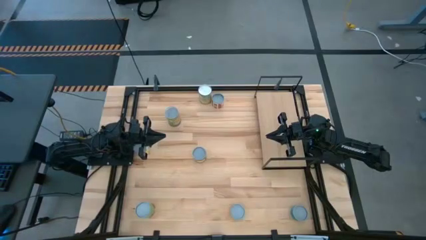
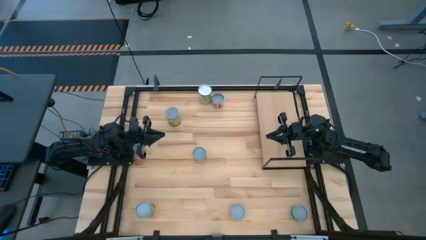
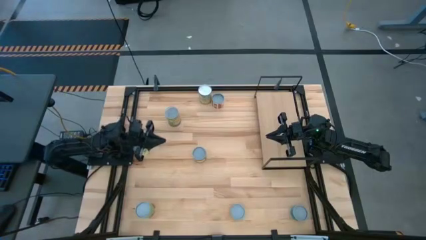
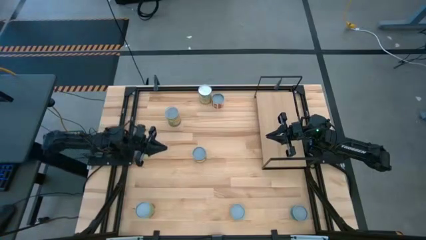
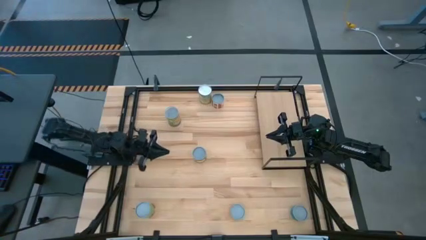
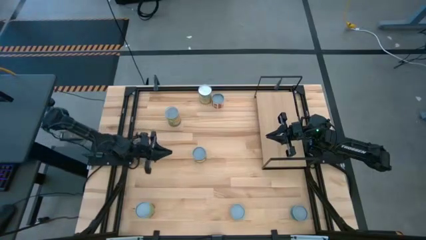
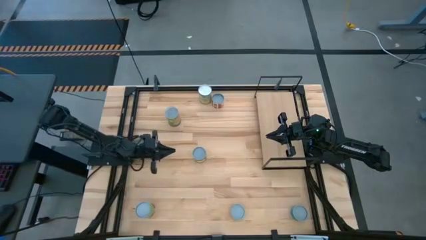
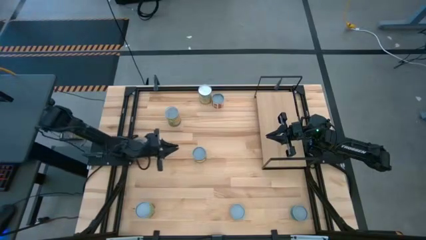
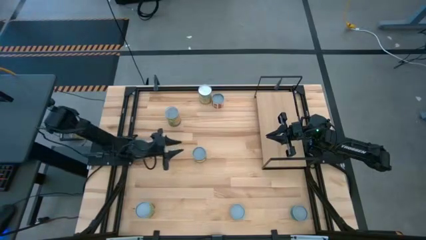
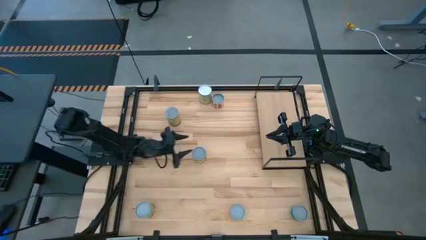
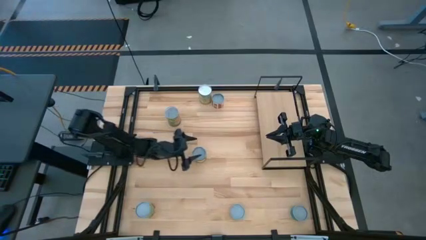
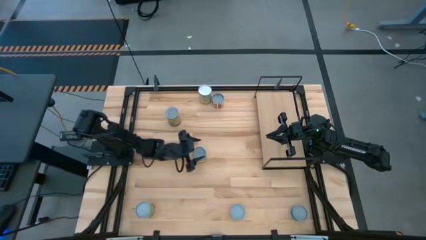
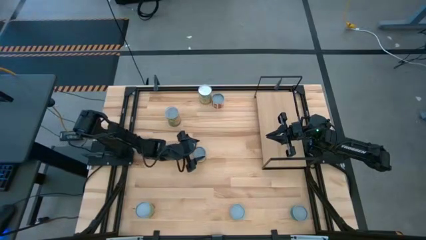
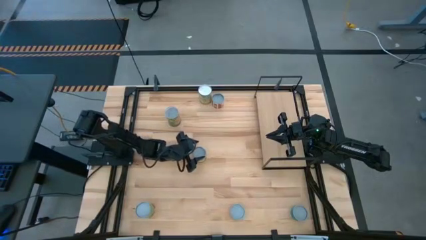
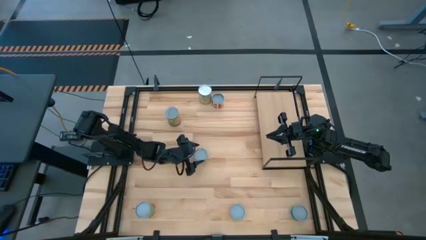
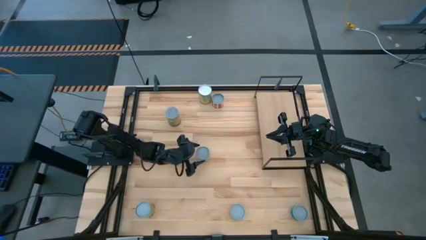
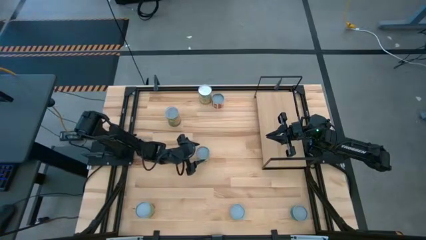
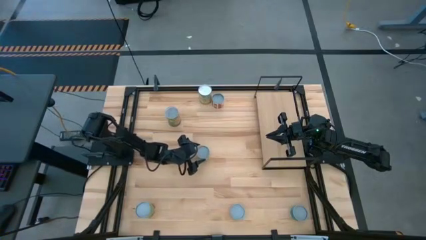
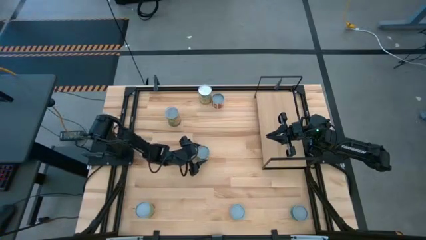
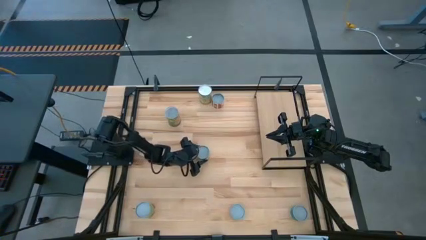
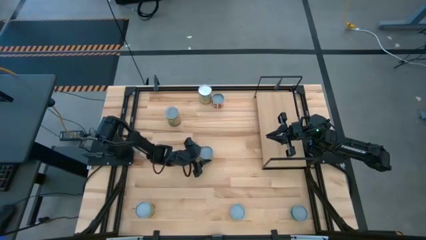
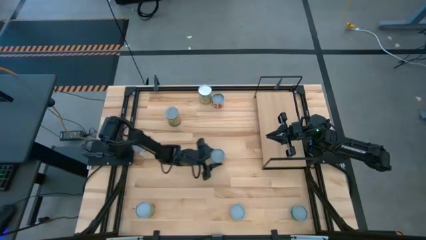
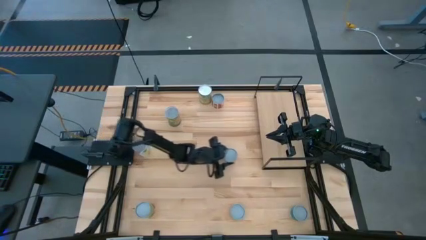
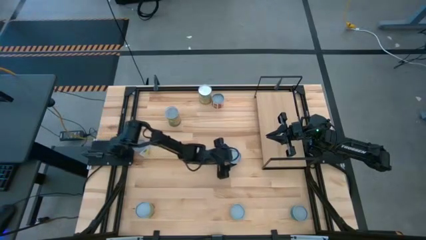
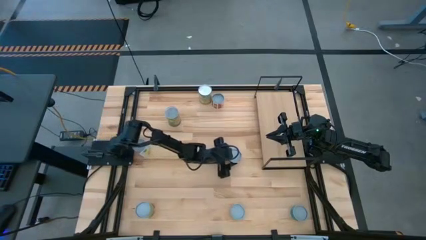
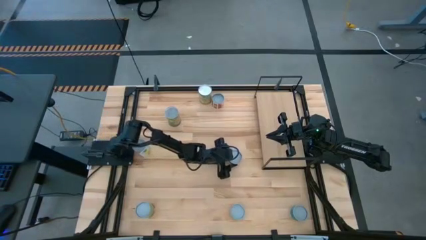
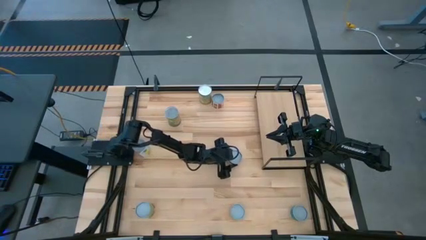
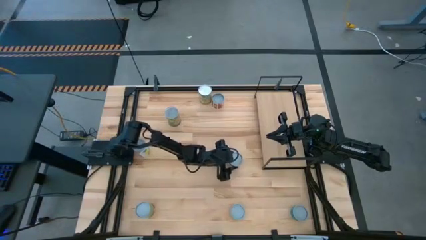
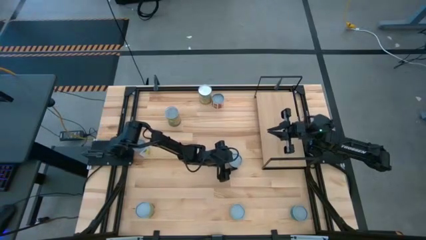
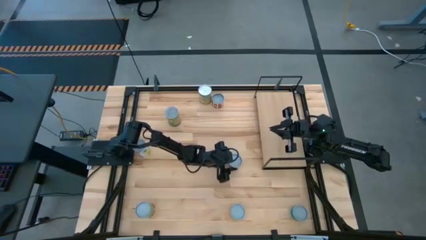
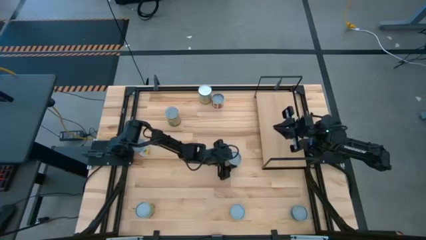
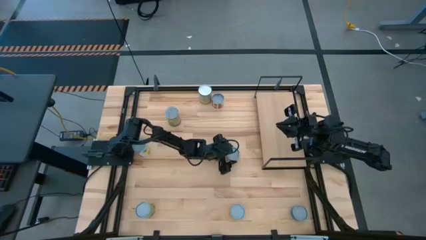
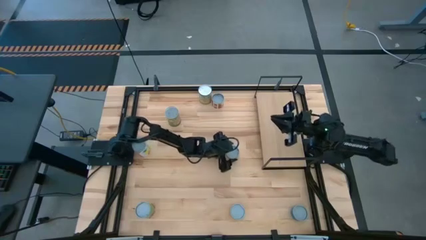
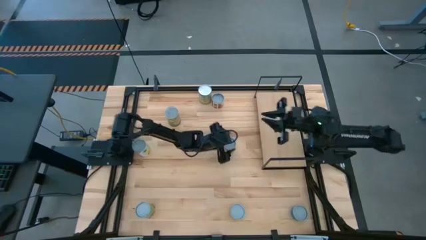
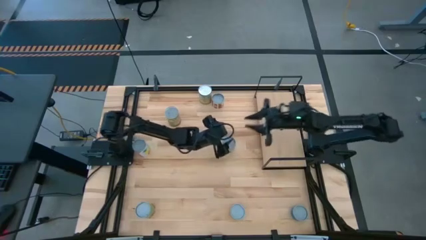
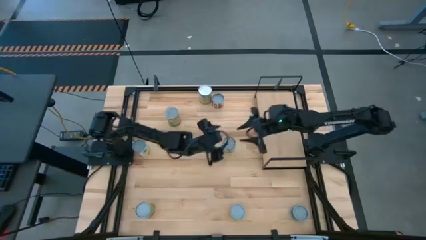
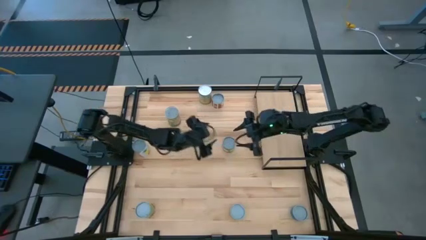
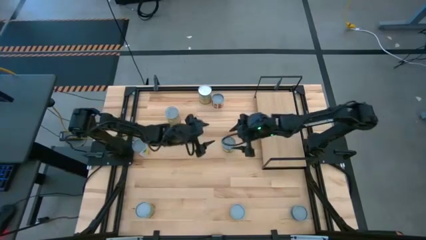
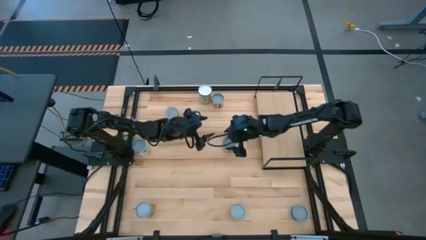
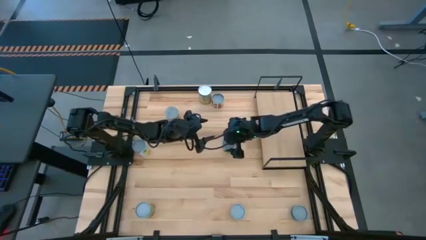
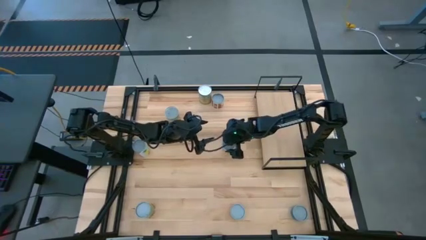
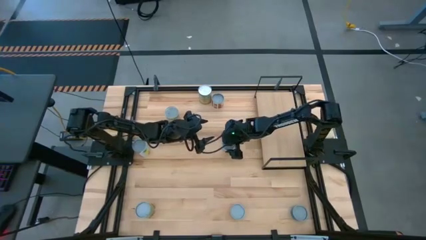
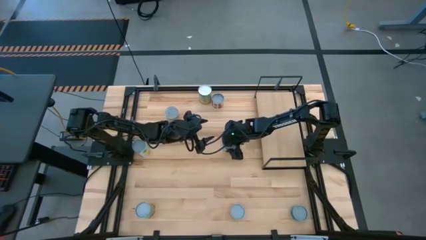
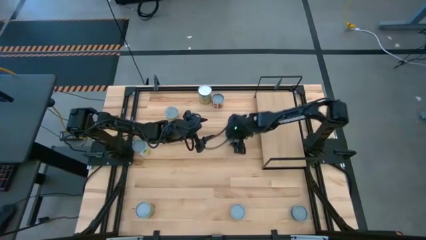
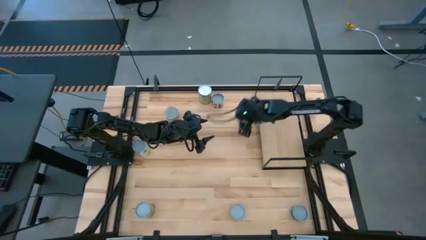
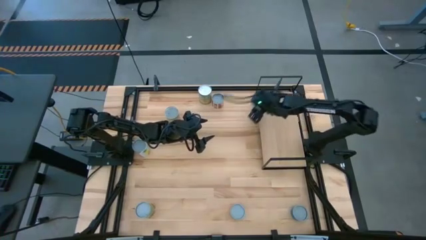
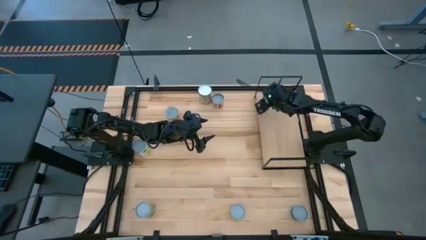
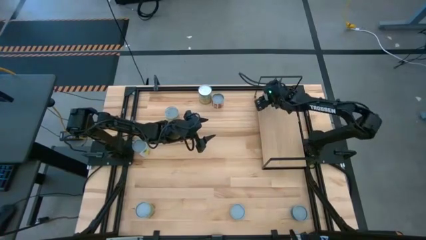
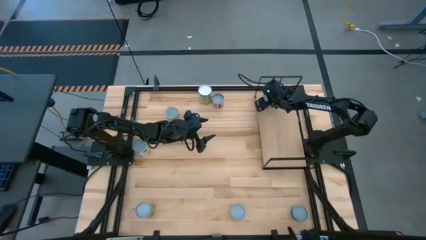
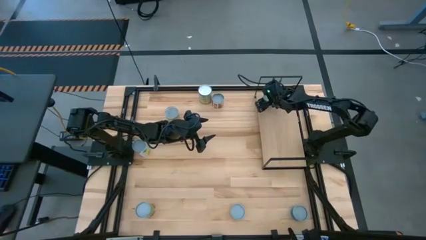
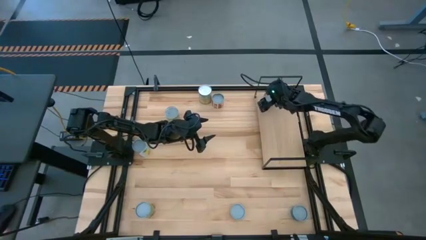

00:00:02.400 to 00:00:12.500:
Task: Pick and place cans onto a shelf
Put the canned orange on the shelf

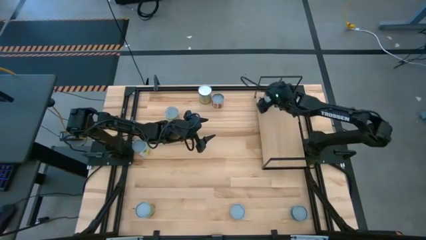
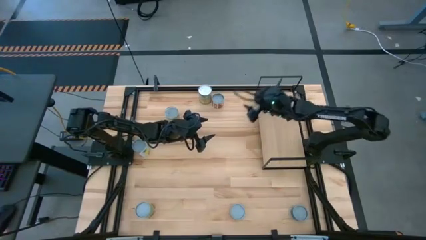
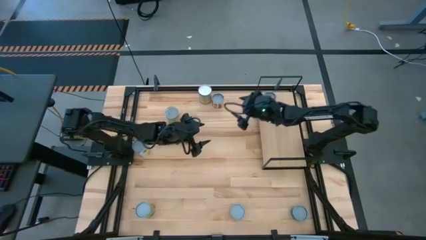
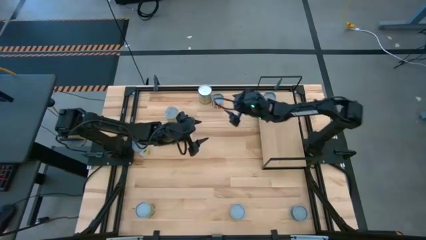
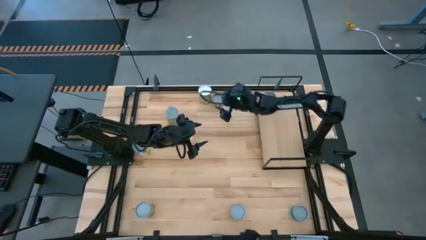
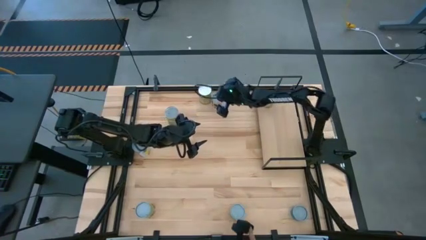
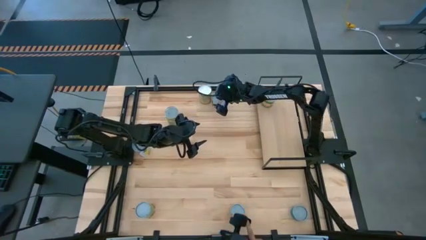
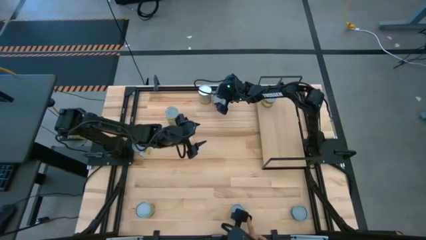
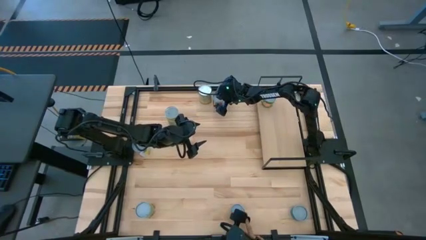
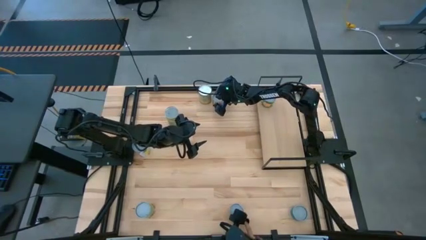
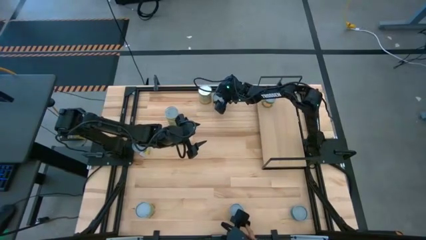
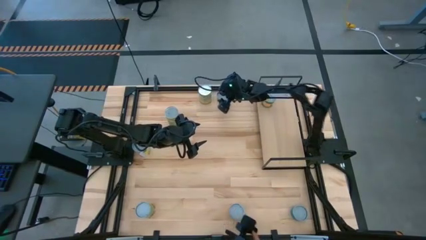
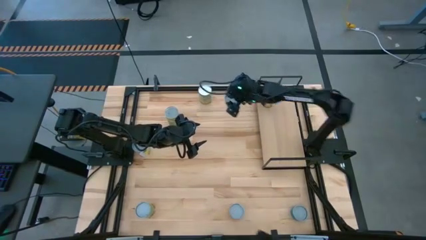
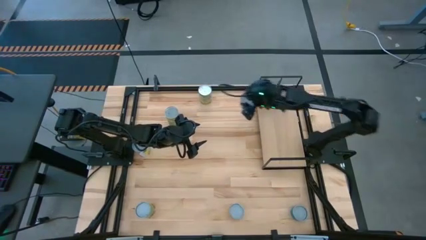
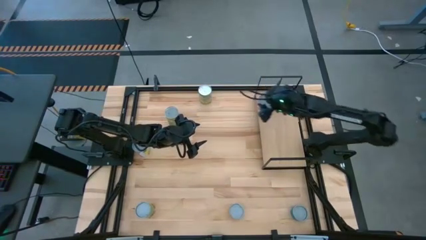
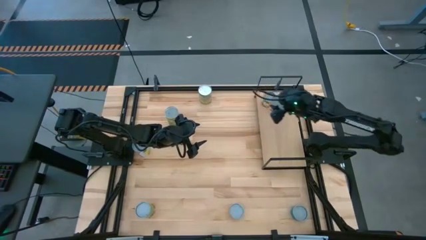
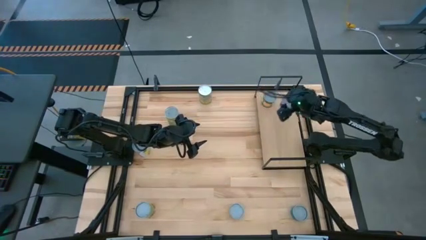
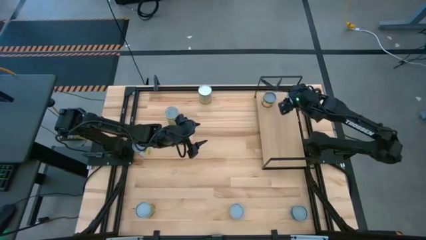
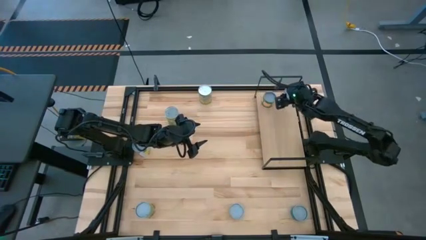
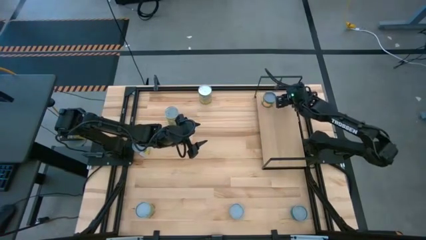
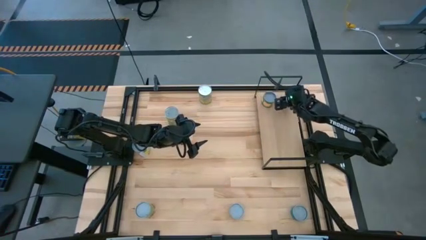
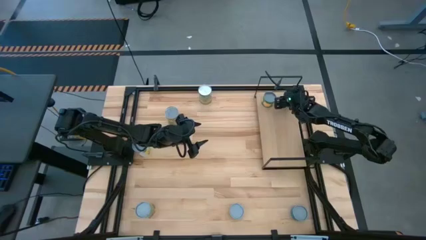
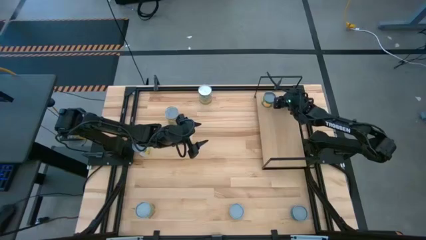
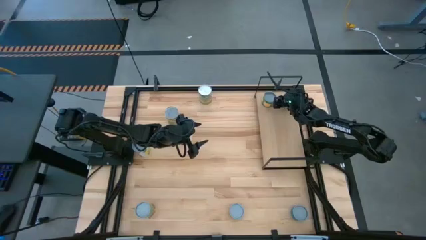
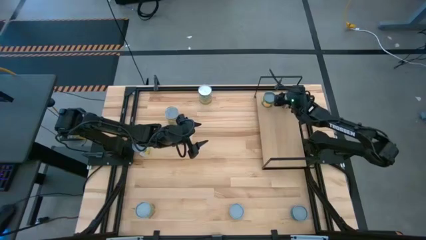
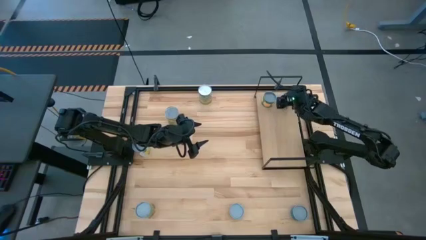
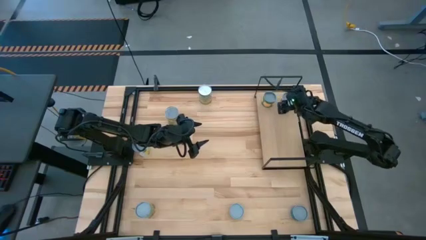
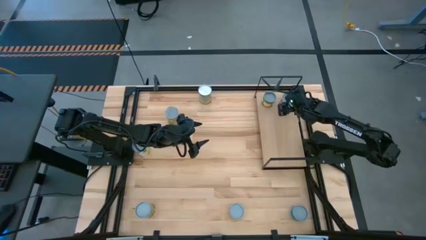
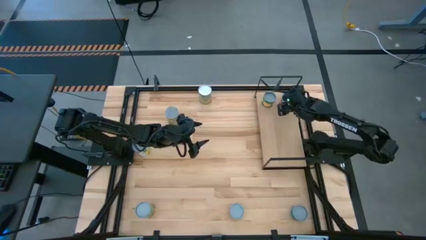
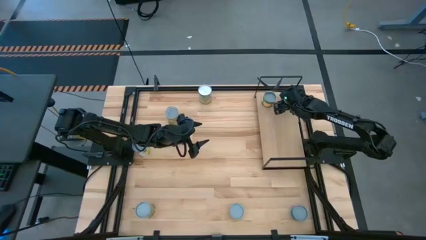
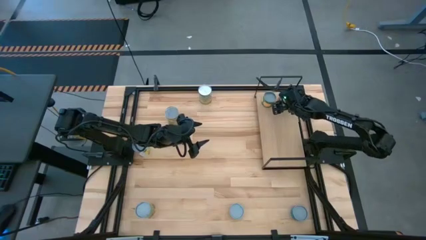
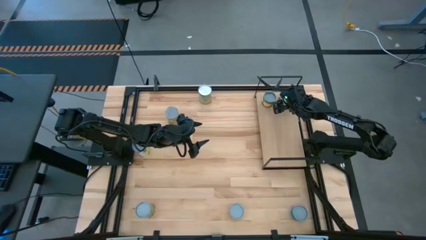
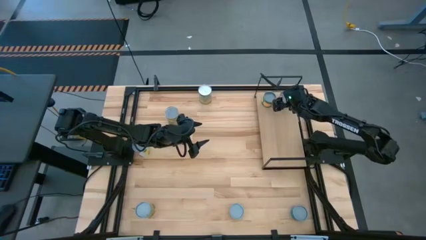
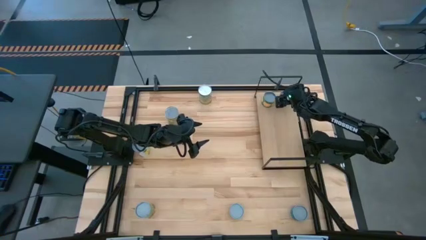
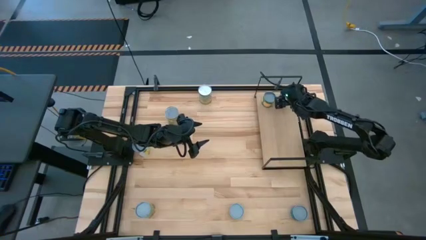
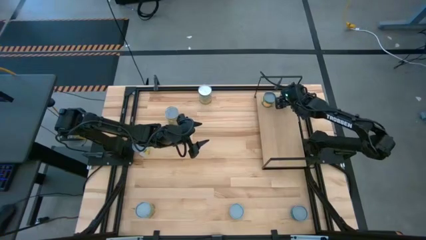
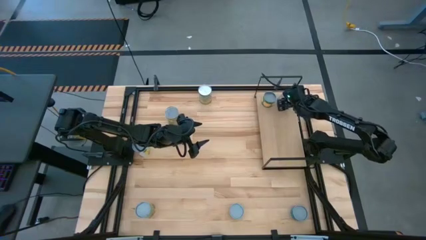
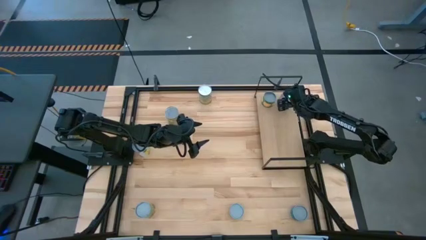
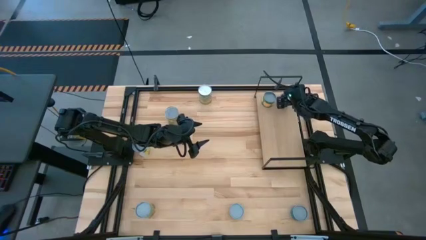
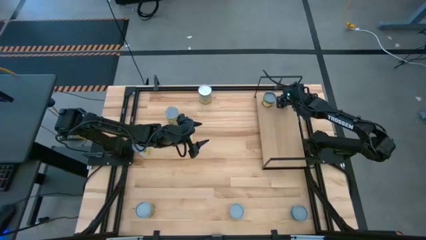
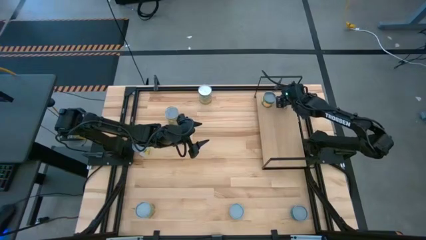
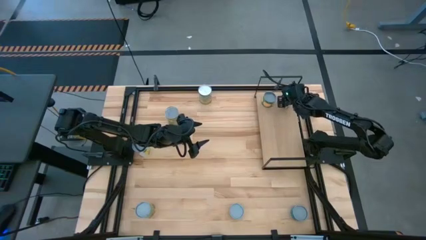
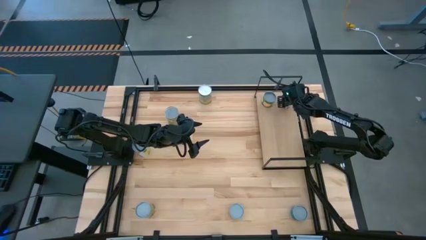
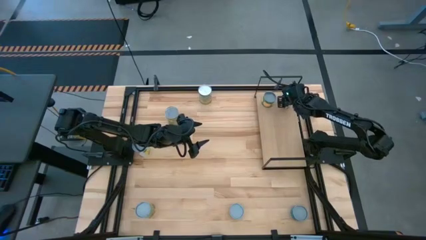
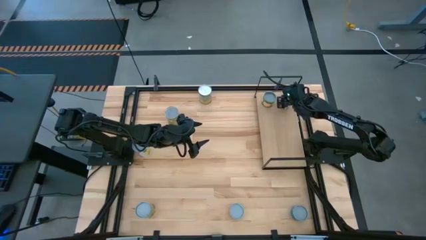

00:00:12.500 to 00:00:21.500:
Put the canned diced tomatoes on the shelf
